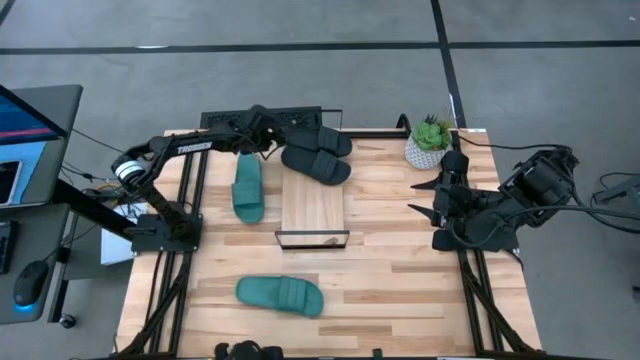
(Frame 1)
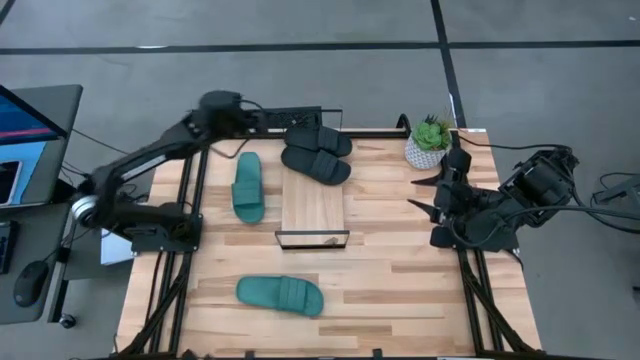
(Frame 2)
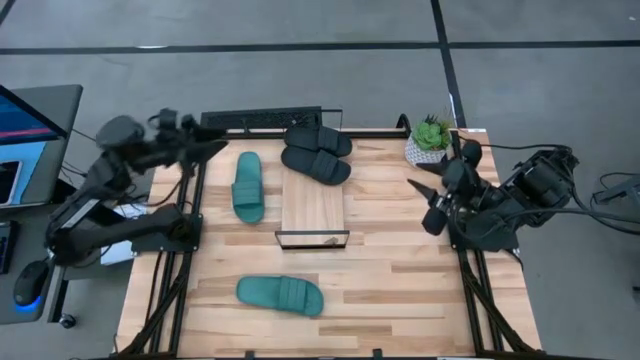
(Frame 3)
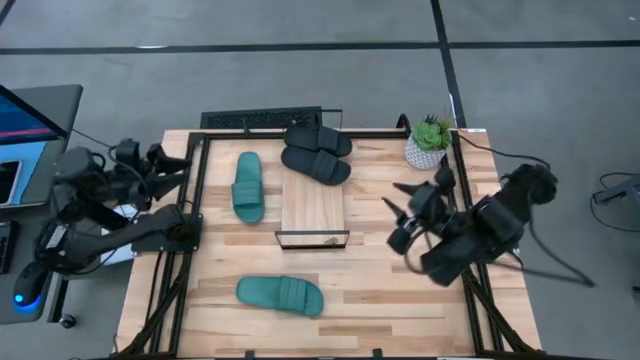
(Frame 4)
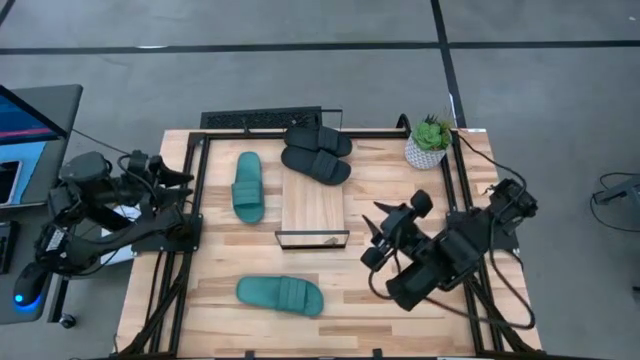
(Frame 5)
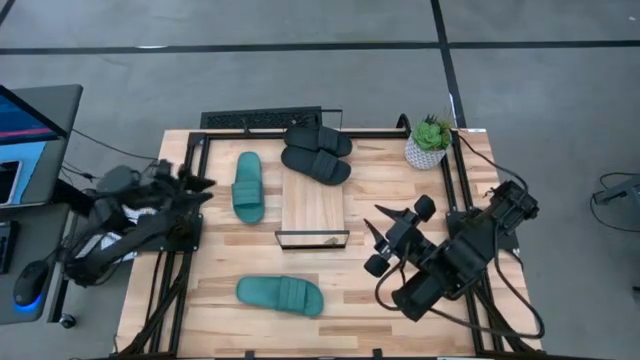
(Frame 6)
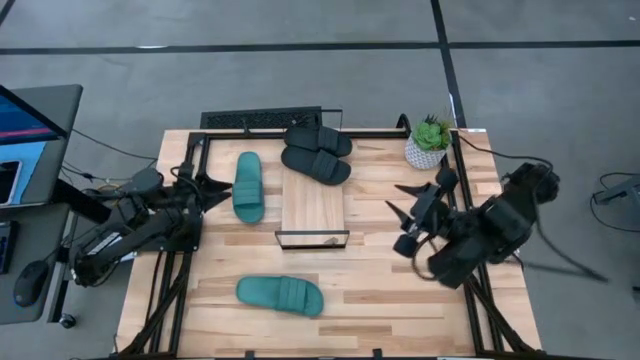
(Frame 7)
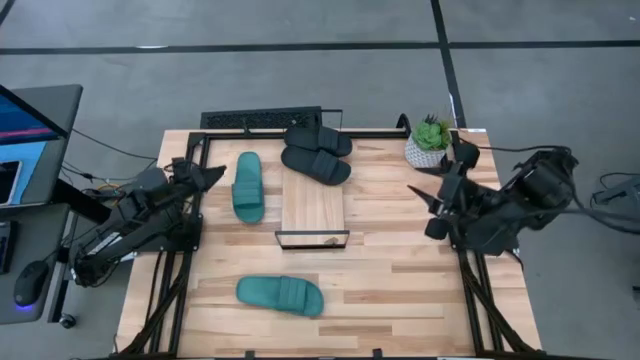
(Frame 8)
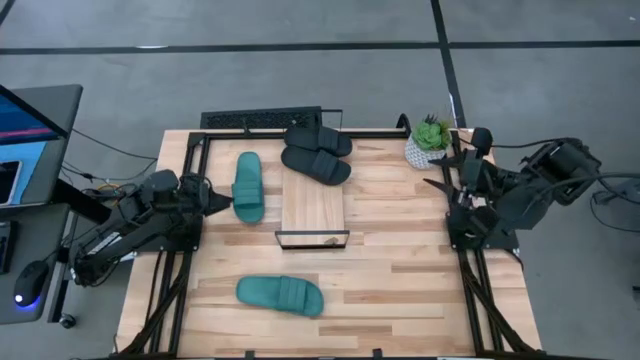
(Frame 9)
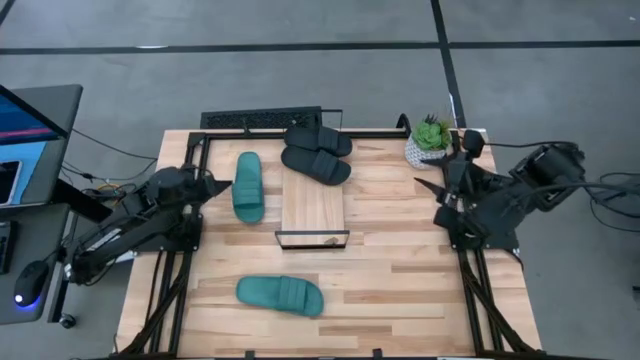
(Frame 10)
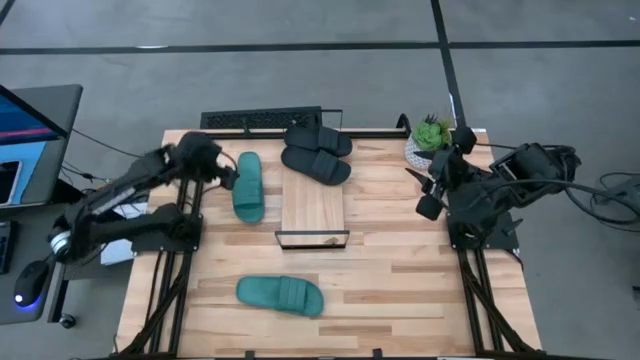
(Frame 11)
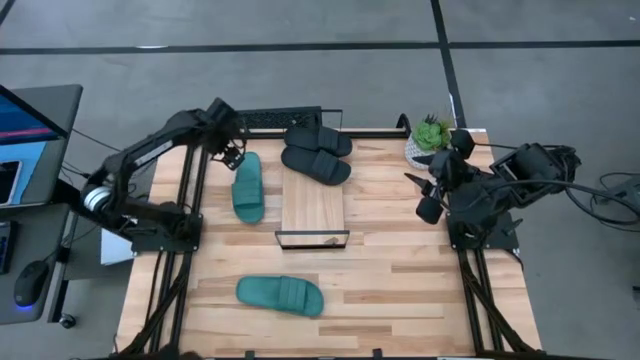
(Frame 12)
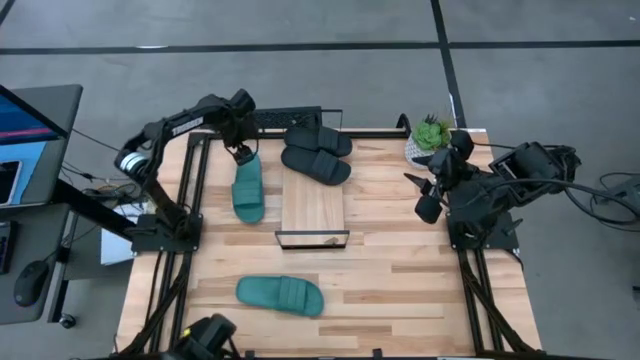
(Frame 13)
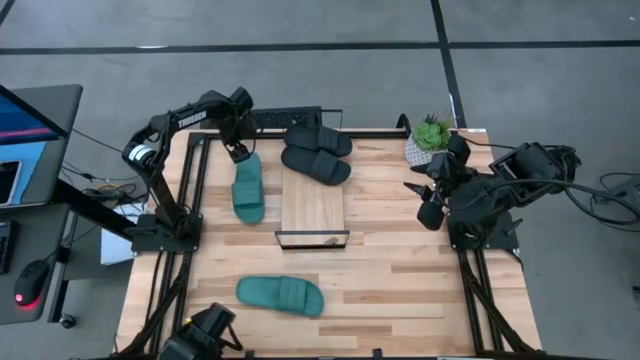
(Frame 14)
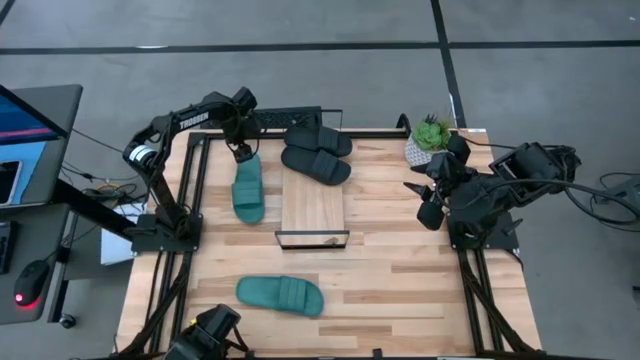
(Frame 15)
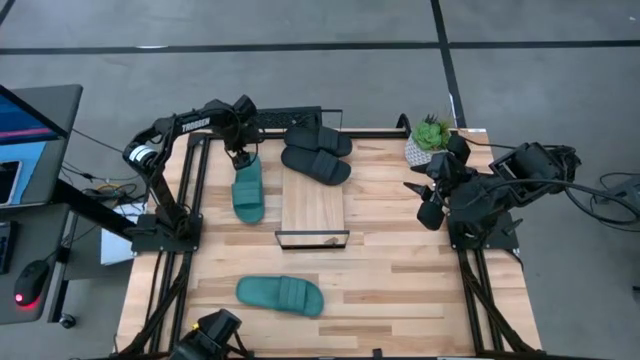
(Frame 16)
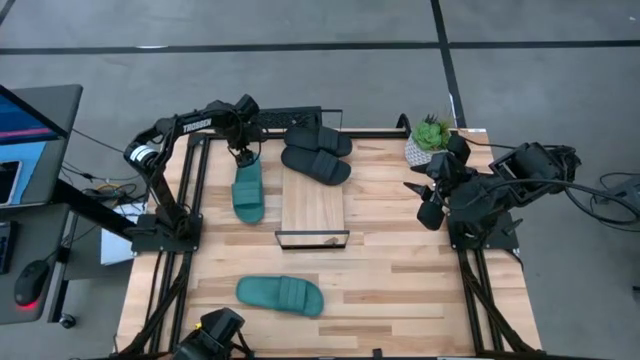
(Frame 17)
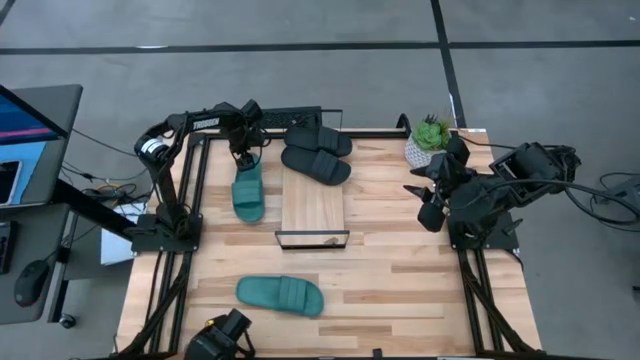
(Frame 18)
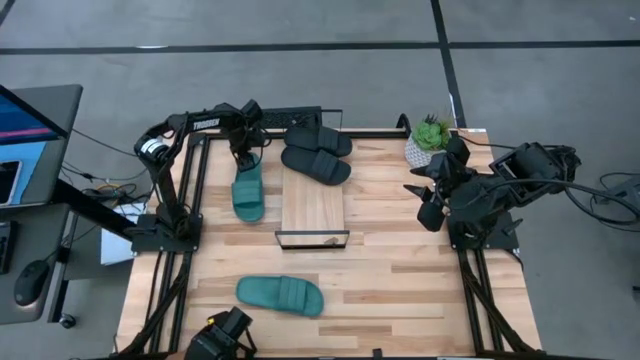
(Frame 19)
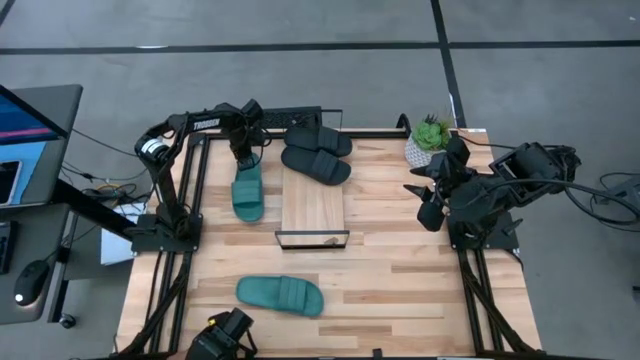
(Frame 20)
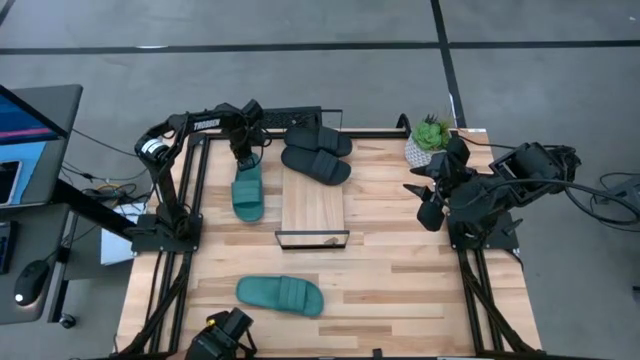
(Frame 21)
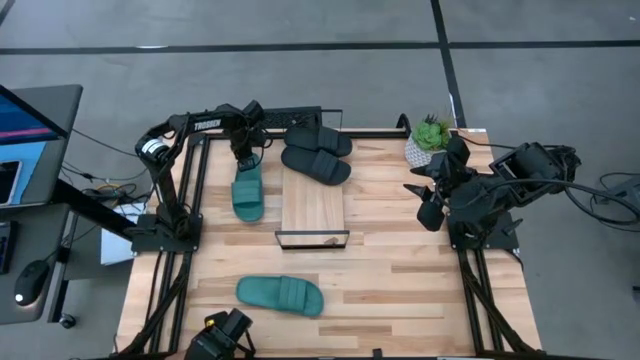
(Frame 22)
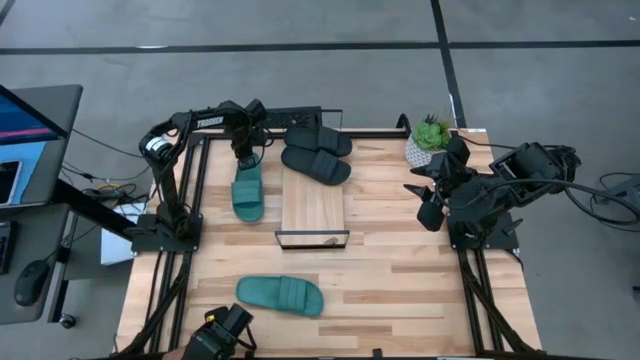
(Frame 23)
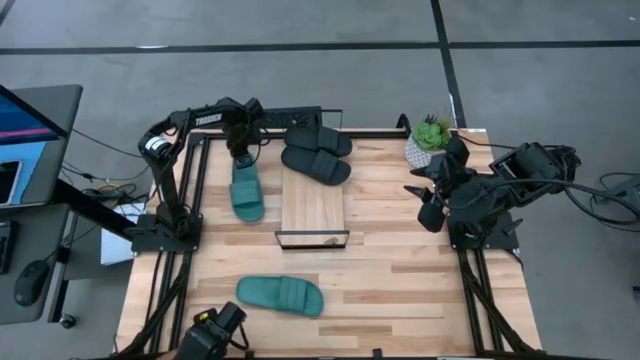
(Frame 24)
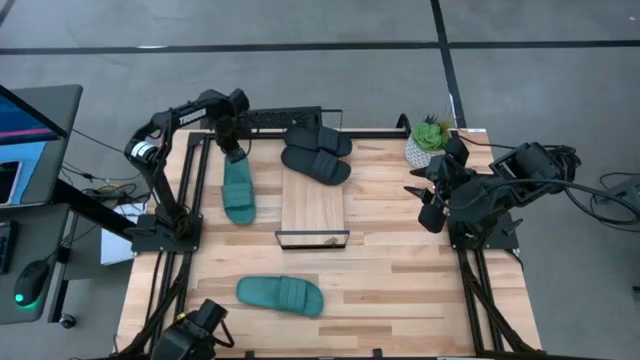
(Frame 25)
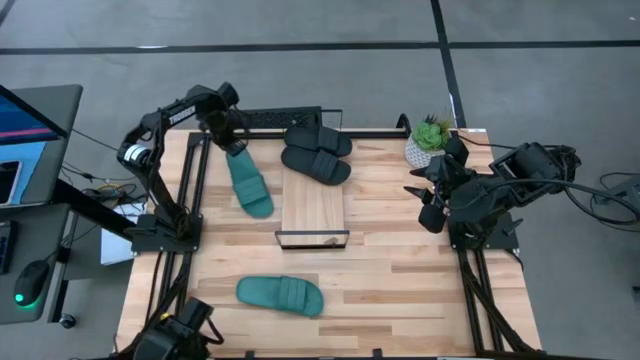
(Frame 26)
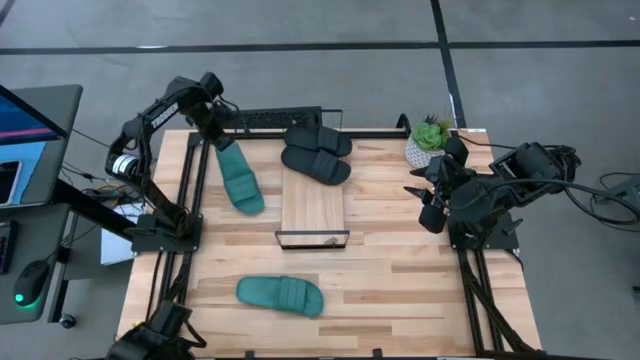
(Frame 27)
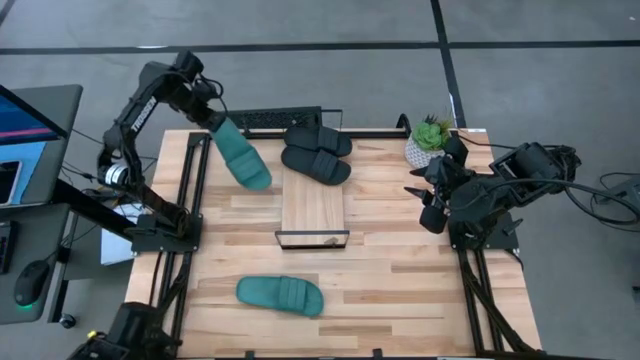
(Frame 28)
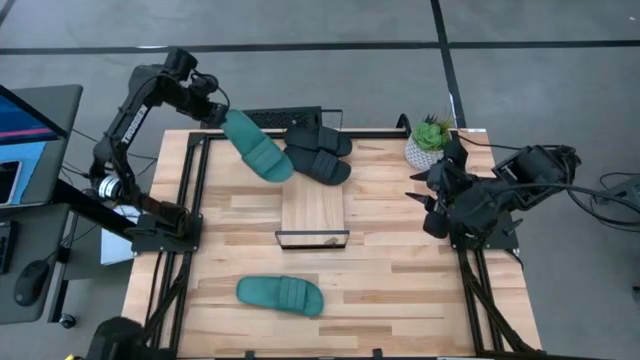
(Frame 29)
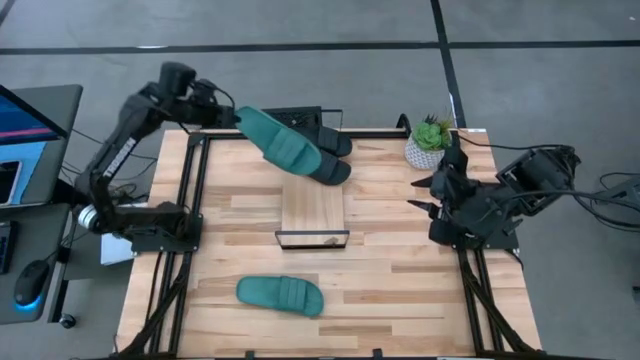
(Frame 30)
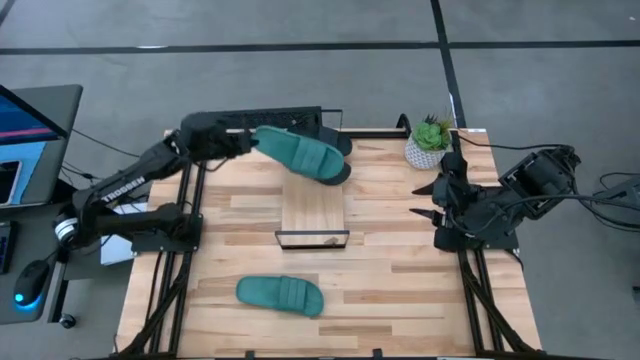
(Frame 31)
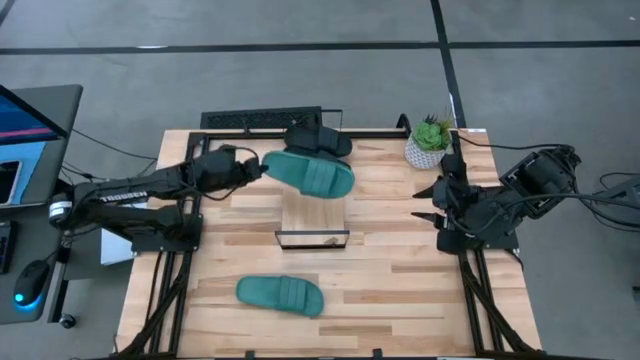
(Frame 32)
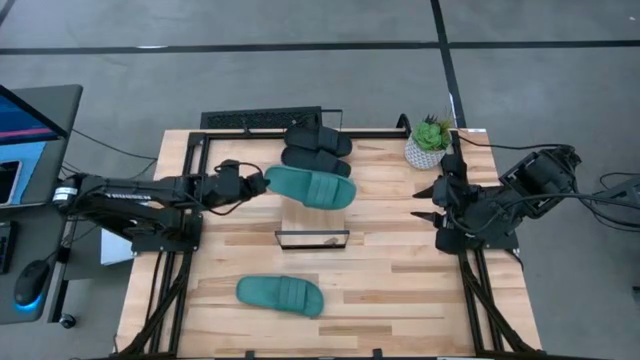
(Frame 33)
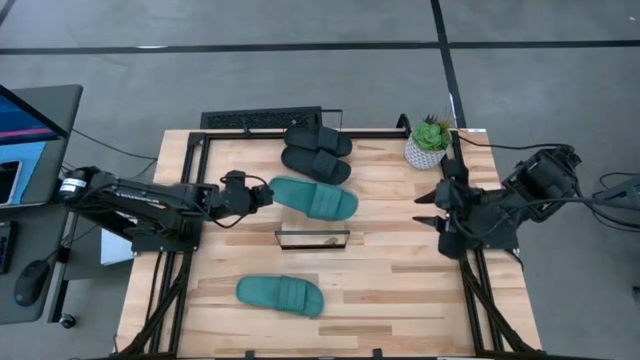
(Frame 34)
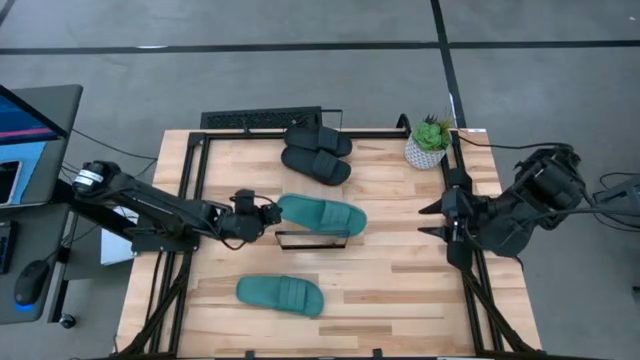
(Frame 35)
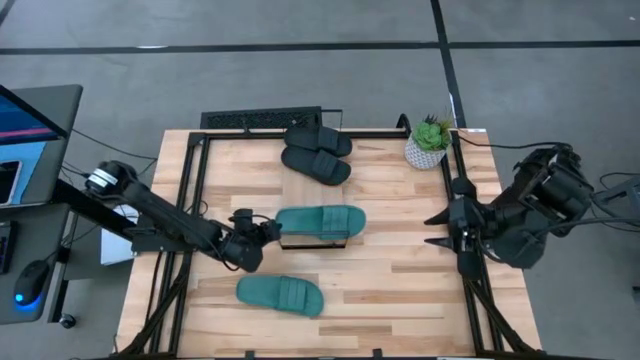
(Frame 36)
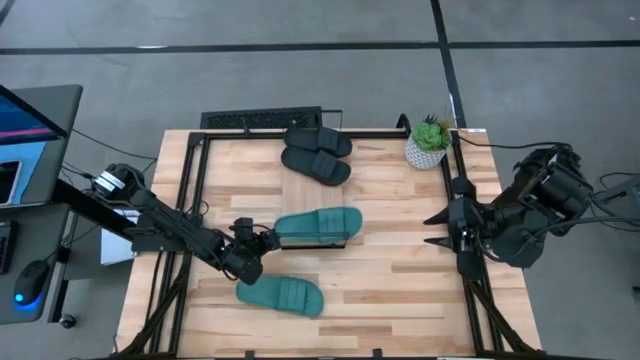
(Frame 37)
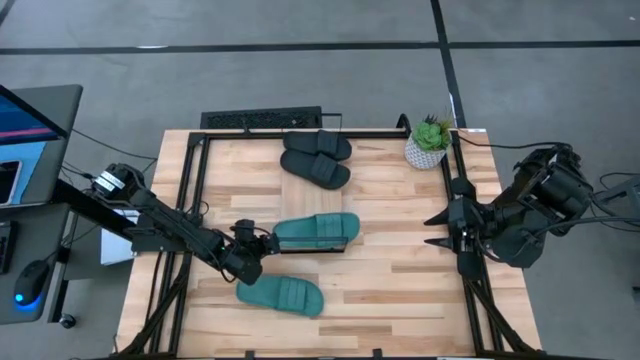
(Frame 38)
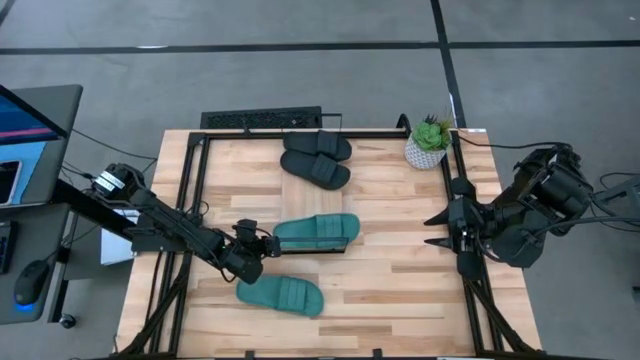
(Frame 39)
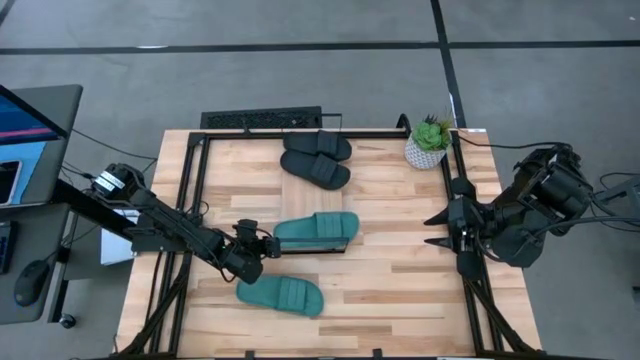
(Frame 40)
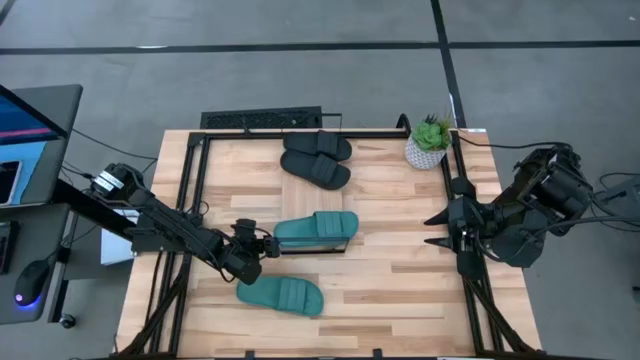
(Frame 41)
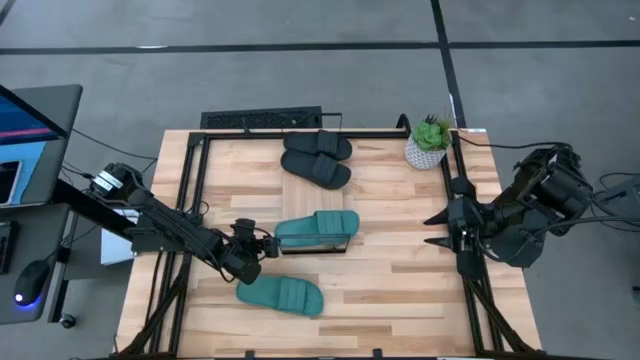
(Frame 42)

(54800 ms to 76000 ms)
Task: Pick and place slides into the shelf
Put the top green slides on the shelf

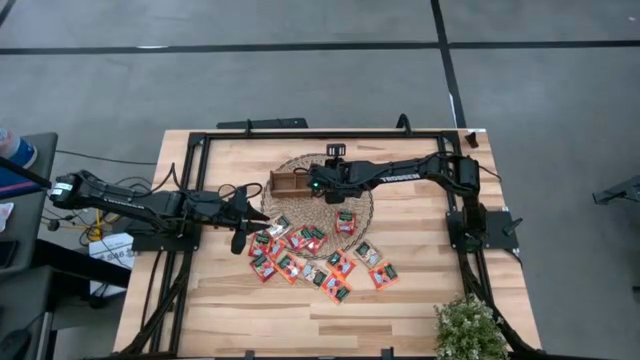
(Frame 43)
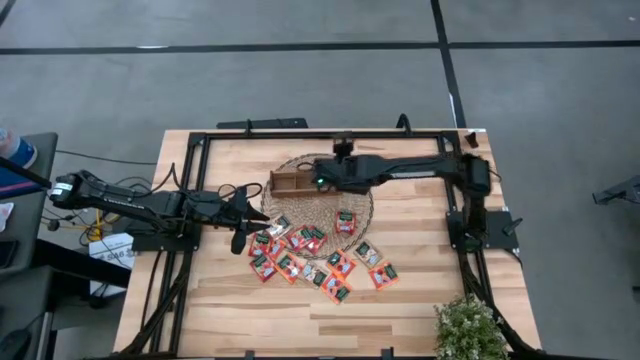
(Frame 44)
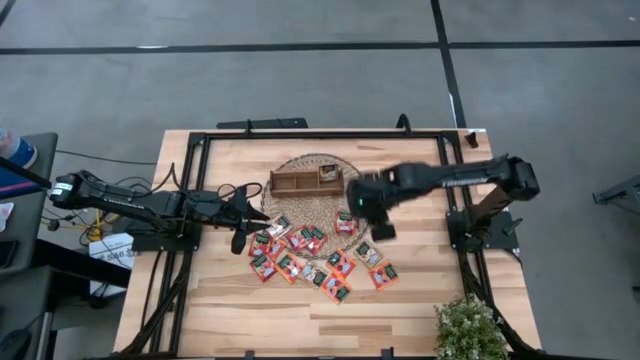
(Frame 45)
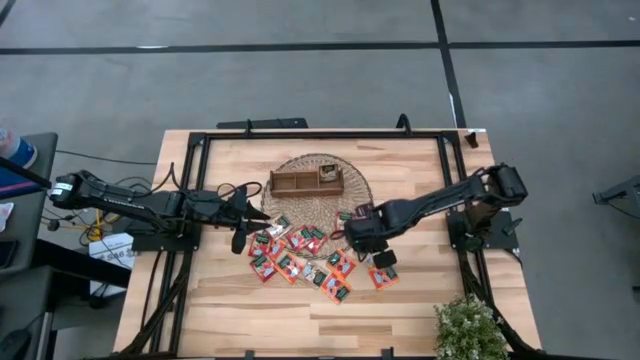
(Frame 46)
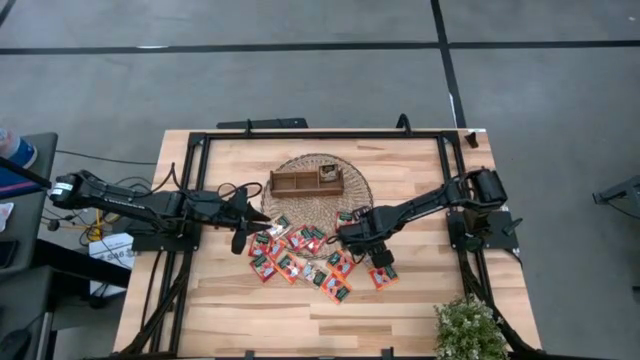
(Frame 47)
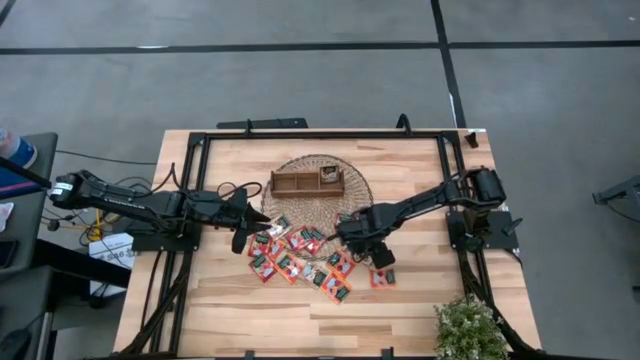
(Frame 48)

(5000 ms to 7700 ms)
Task: Pick & Place Tea
Put the brown tea bag into the right section of the wooden organizer
